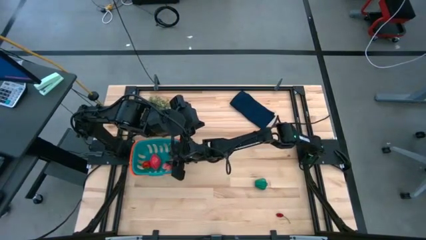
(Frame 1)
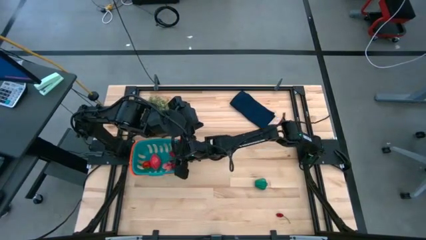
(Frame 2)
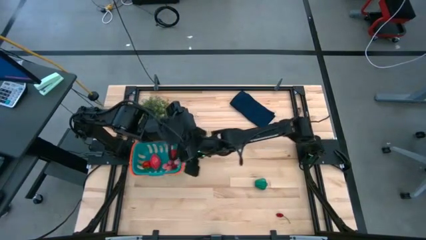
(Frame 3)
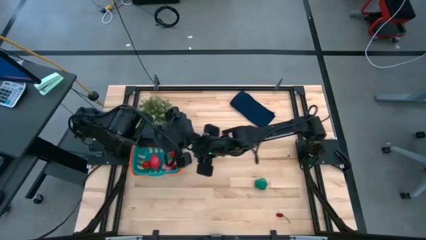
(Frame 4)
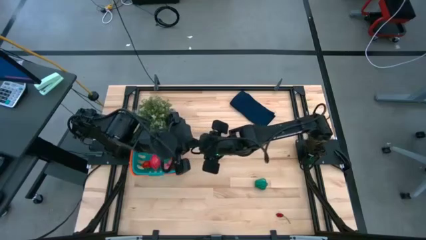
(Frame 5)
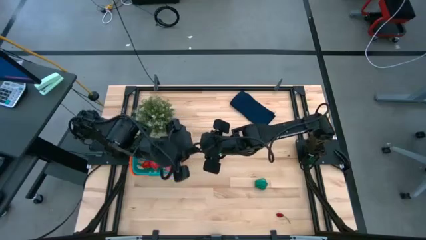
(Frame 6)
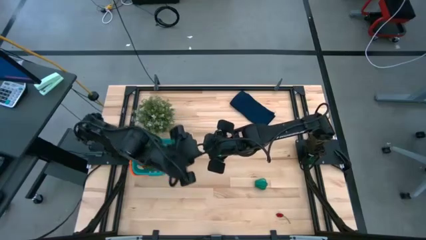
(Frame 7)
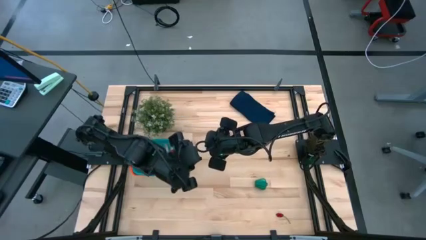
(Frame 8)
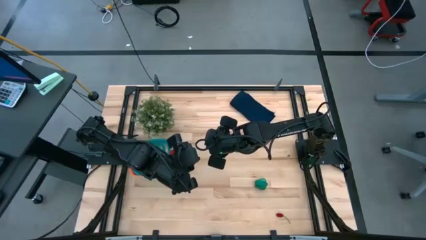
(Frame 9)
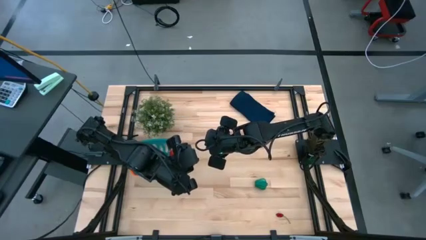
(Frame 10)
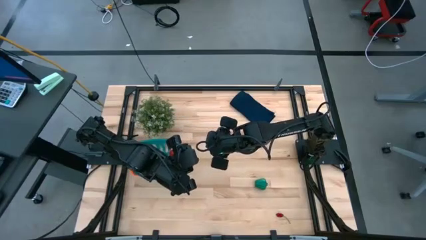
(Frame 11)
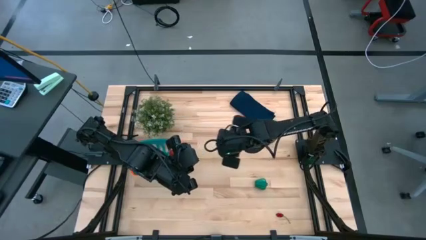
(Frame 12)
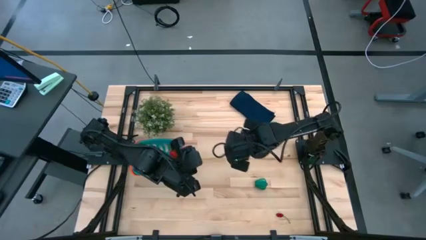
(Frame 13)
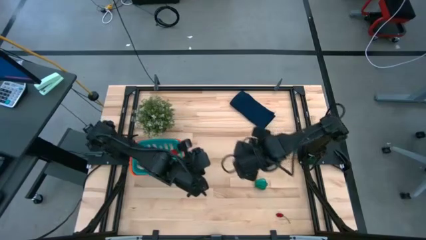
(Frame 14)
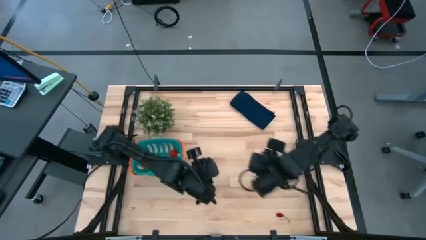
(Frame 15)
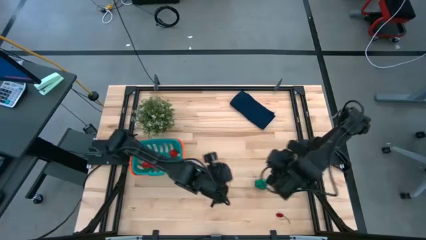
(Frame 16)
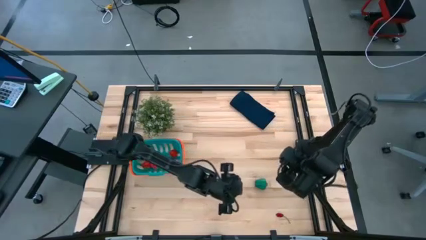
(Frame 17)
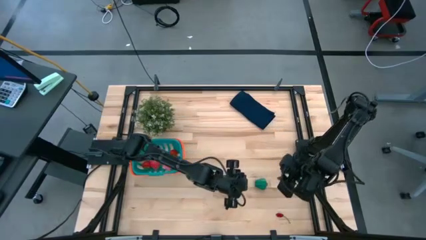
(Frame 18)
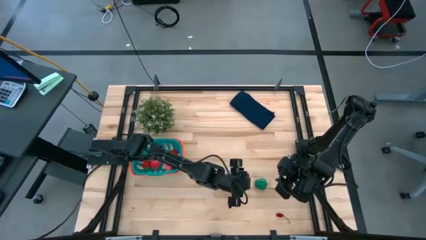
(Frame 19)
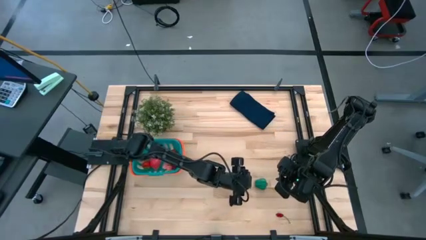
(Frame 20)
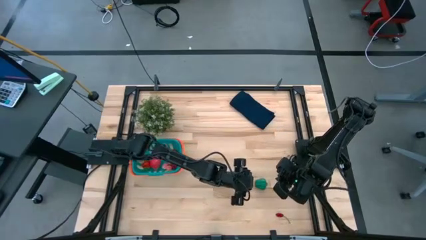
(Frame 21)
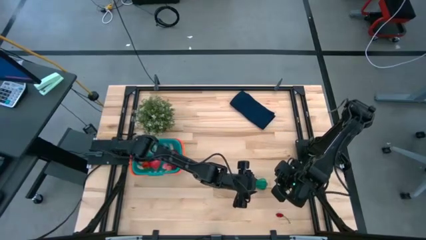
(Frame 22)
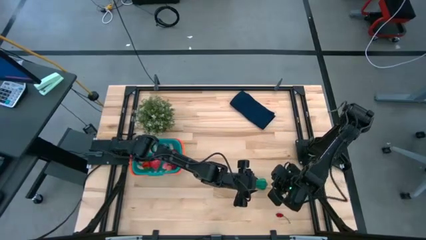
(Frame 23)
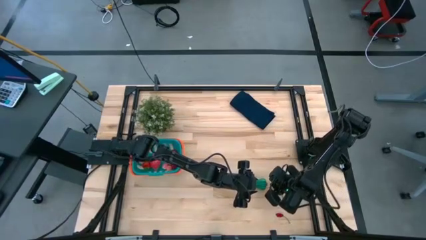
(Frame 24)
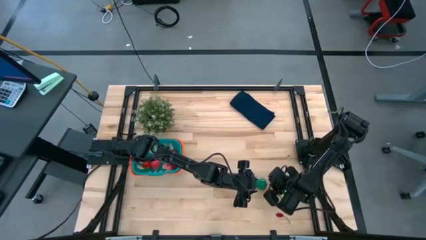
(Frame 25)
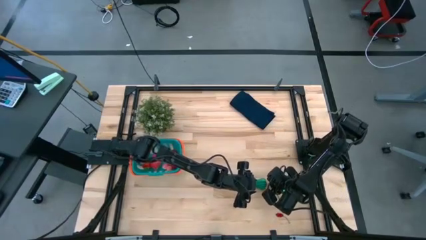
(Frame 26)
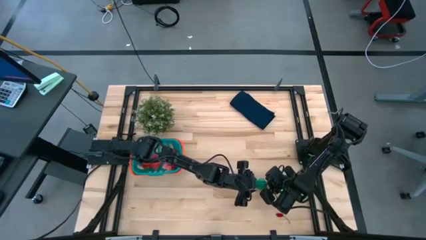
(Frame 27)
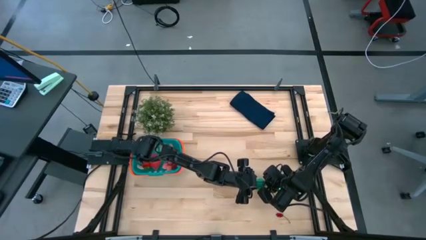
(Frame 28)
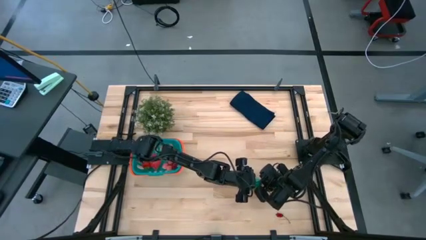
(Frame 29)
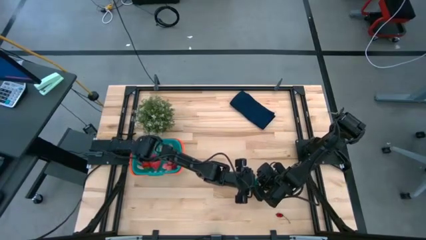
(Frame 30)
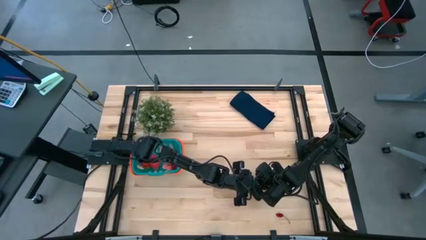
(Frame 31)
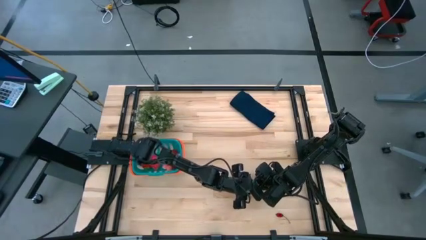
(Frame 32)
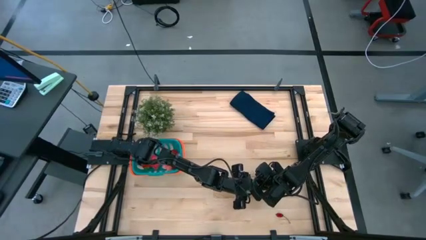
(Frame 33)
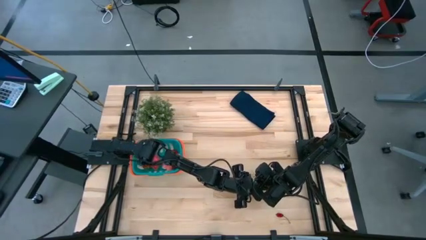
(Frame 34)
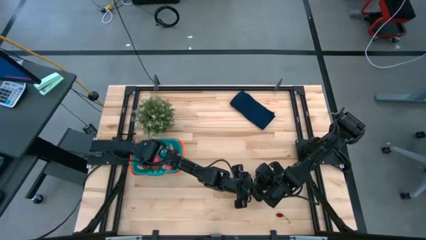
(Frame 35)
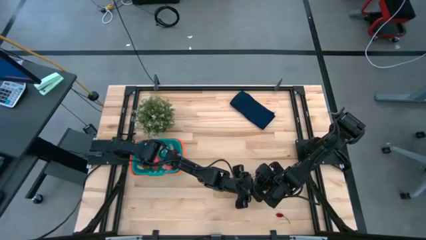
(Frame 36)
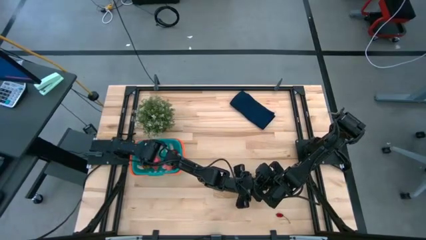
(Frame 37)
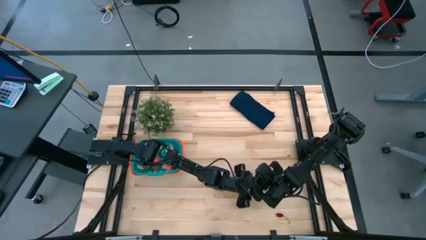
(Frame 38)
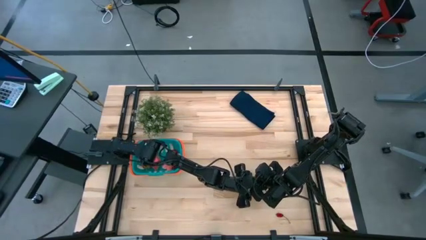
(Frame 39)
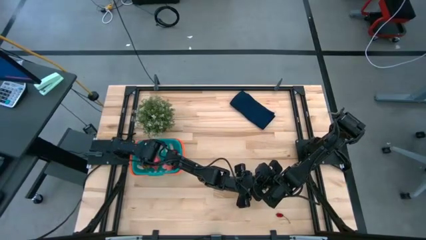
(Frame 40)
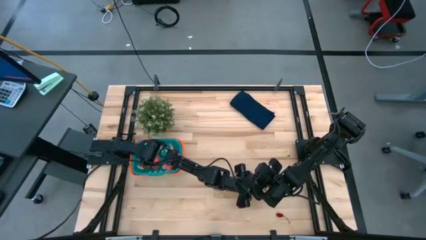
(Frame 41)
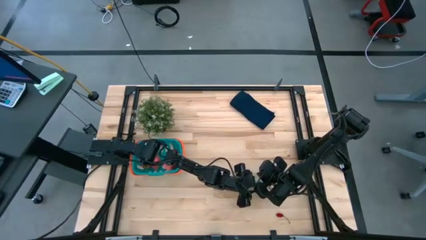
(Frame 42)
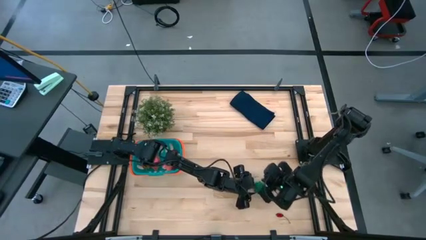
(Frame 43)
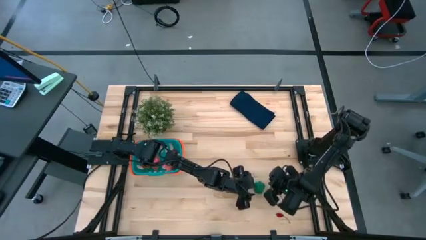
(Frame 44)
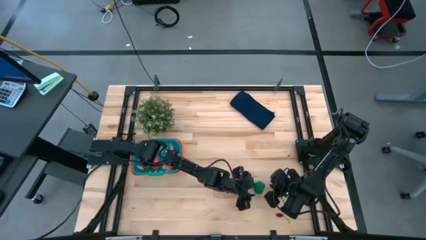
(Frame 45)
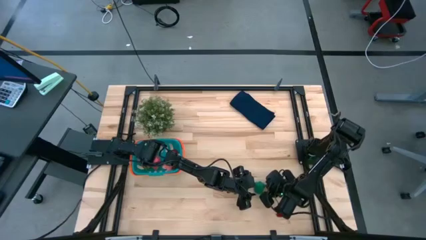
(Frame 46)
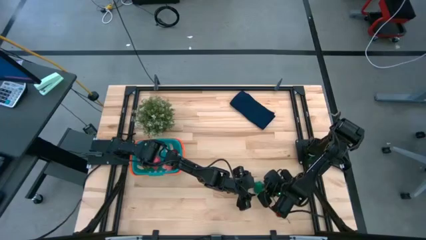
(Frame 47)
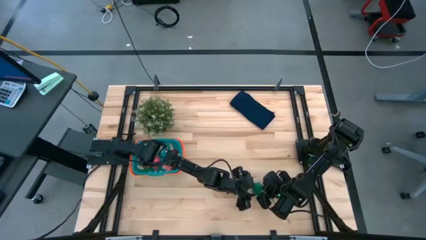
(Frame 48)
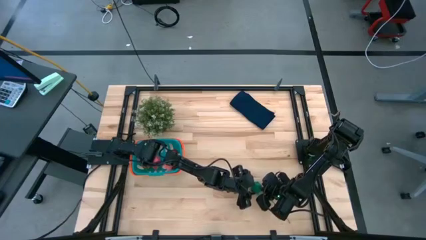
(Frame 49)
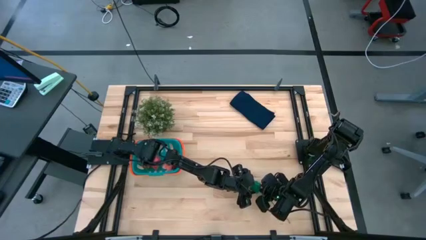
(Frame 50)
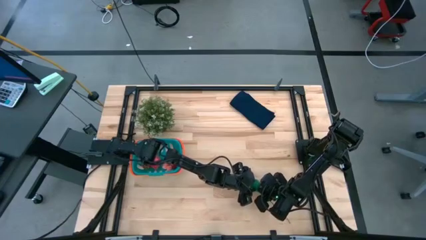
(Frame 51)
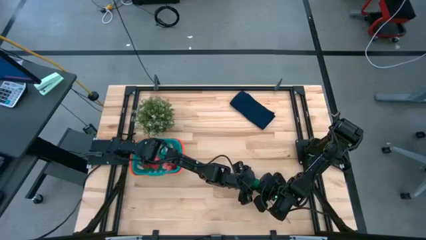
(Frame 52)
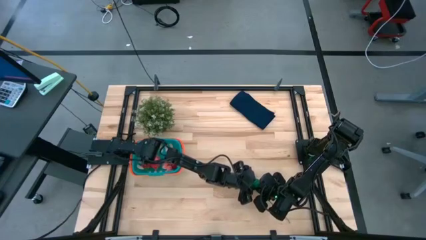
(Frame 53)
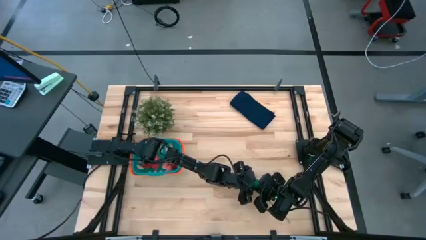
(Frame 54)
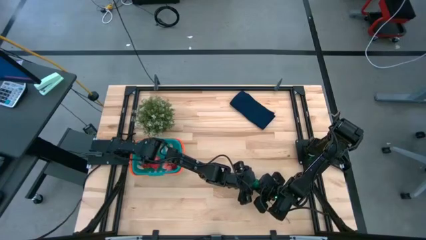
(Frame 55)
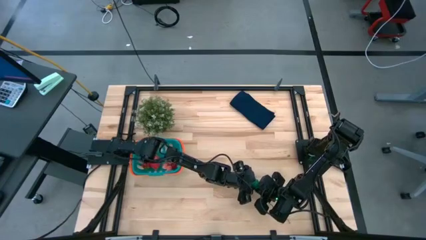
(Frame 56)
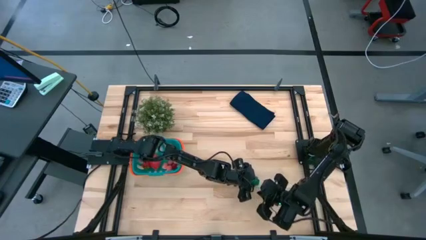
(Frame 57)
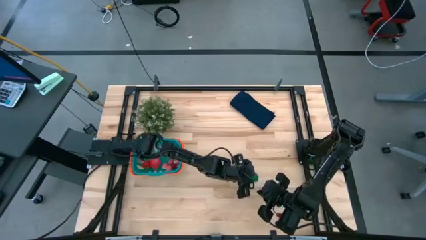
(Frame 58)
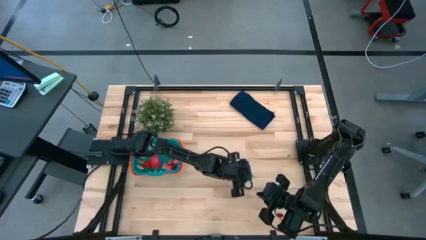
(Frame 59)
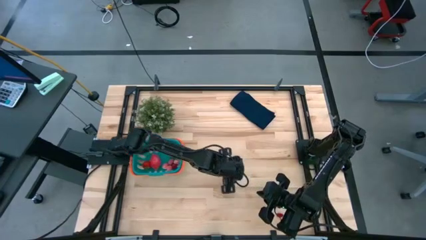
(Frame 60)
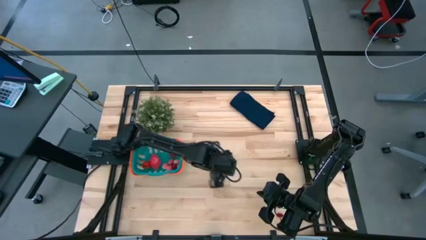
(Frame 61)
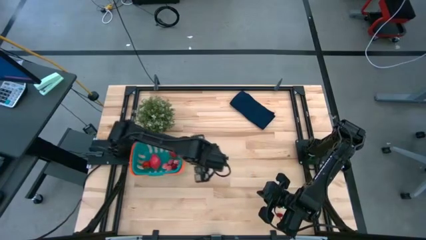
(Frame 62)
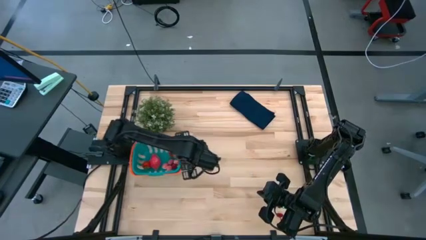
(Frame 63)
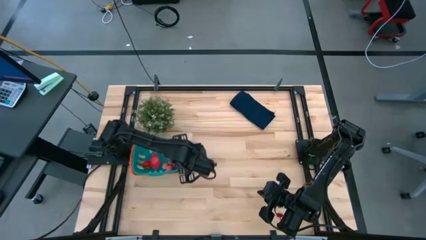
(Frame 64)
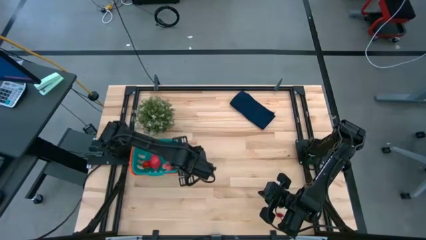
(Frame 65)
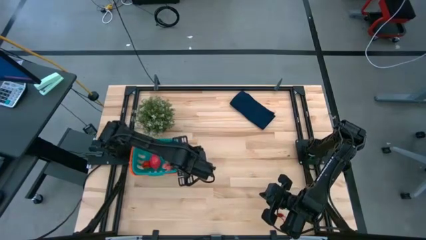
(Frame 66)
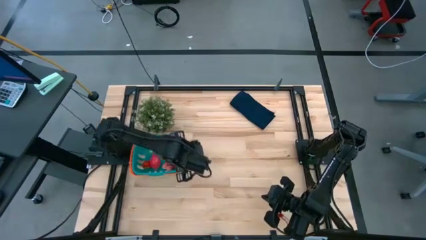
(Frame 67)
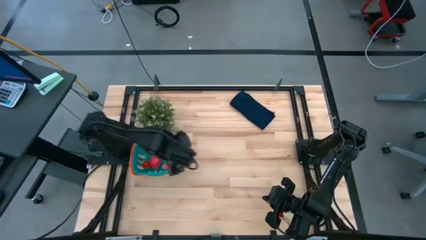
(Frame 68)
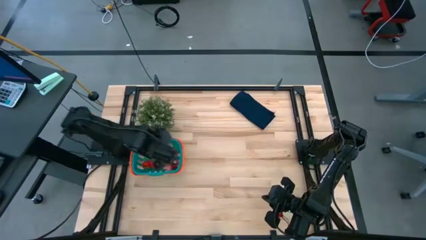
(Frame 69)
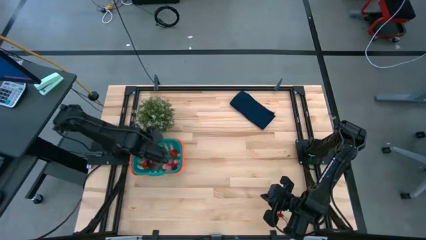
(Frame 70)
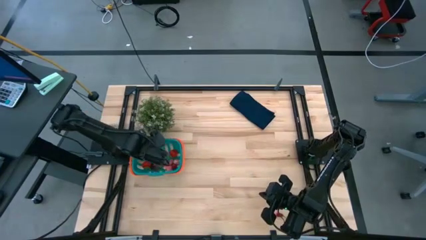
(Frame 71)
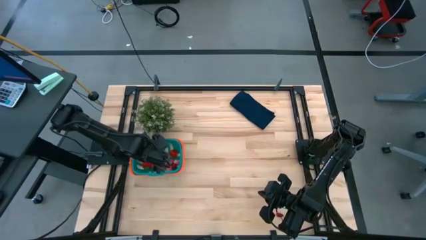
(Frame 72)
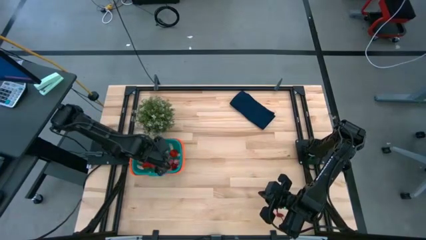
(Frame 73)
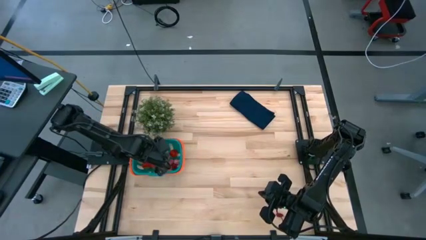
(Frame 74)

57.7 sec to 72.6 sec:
Task: Pick and placing Produce into tupperware
Put the green bell pepper into the green basket

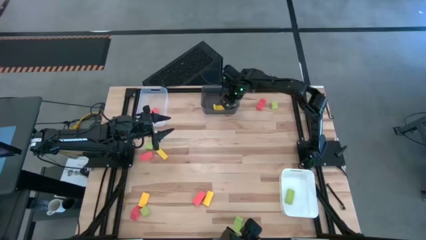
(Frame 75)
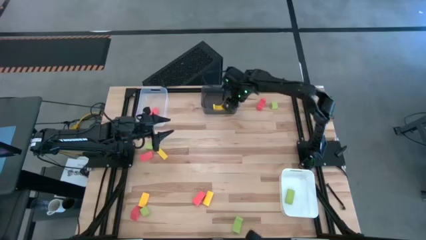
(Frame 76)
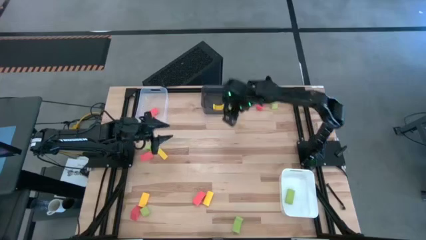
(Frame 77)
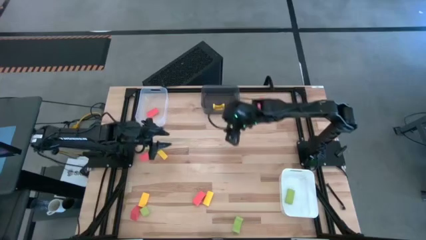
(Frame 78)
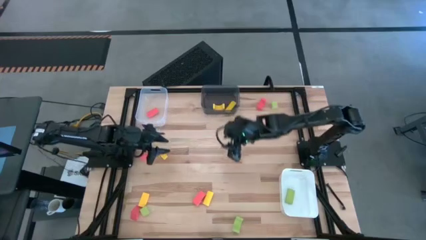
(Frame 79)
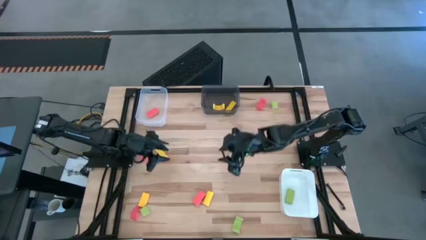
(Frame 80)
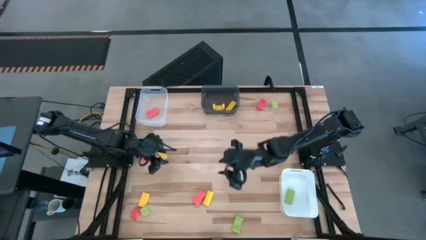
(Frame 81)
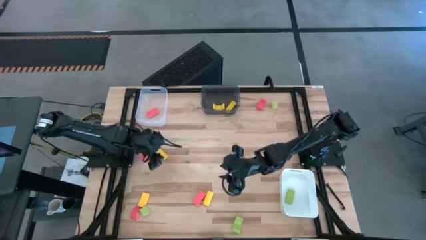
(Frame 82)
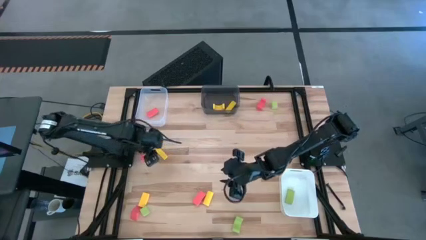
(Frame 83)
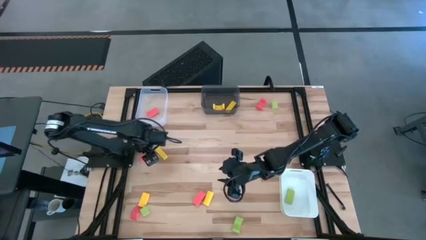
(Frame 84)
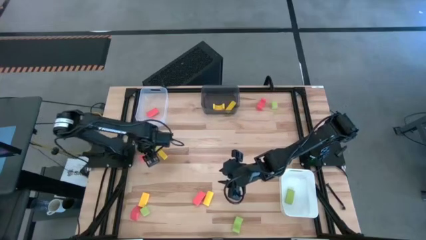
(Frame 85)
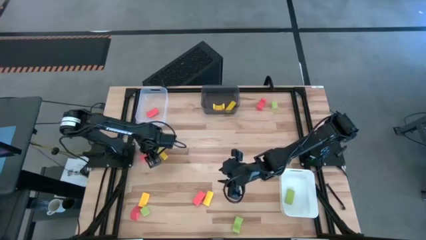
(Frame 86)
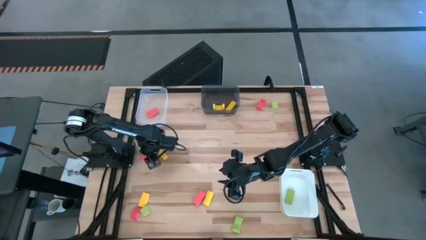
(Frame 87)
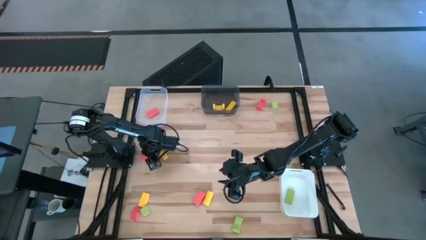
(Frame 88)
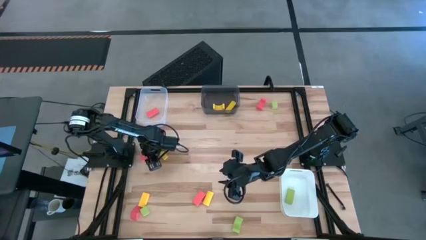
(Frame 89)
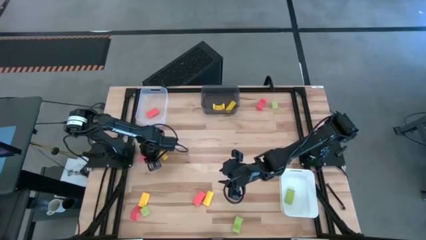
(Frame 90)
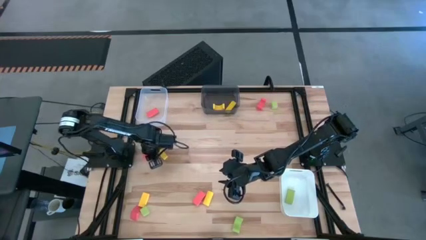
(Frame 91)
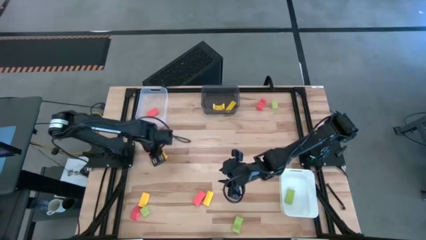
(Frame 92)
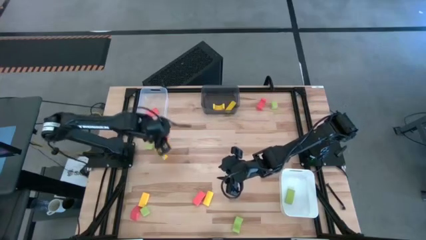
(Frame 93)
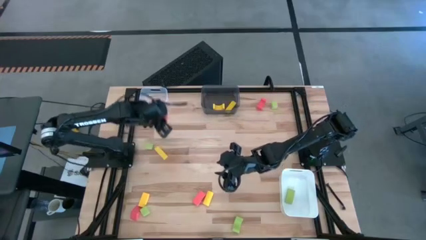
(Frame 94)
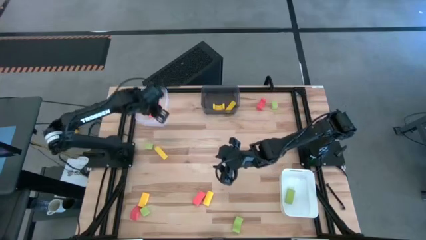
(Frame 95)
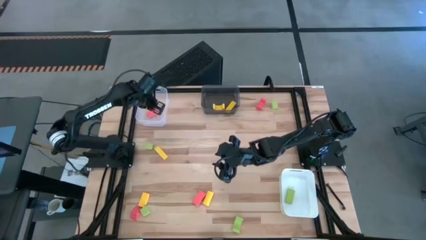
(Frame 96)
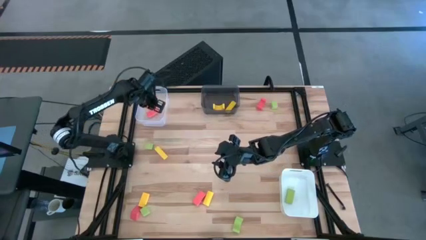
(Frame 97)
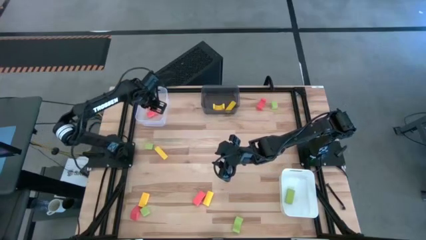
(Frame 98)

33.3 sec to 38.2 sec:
Task: Sort & place blocks by color
Put the pink block into the transparent bin
